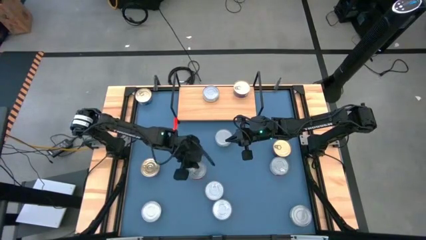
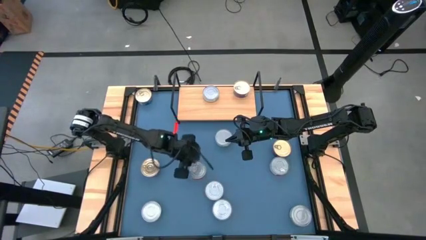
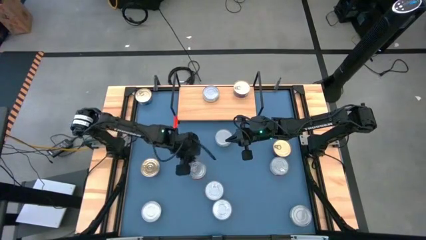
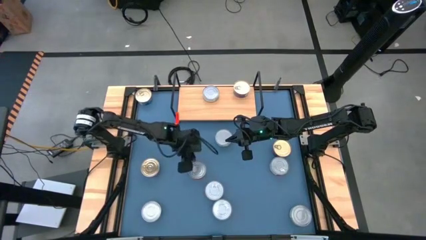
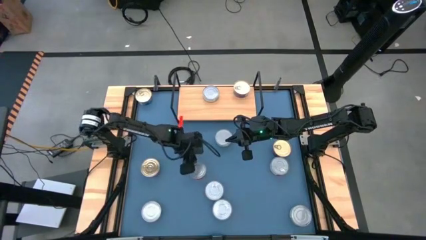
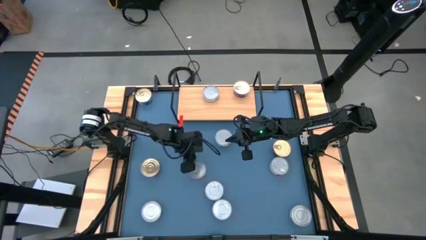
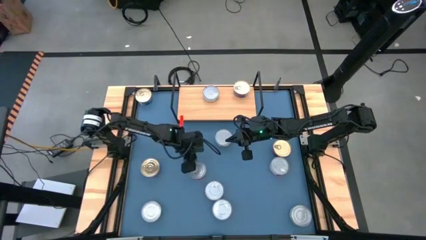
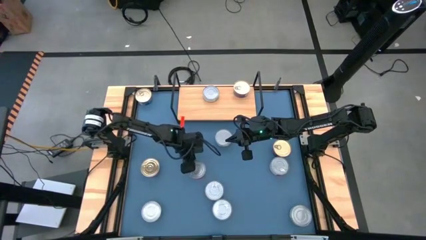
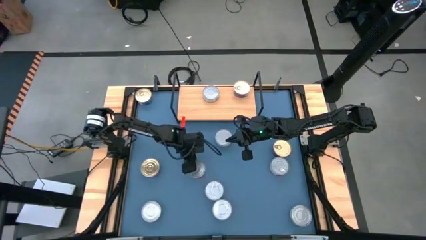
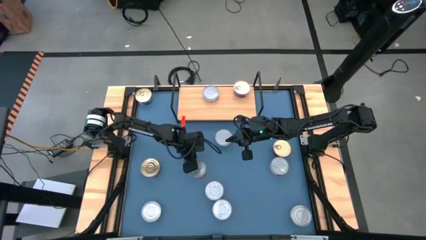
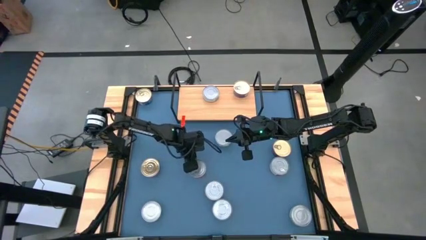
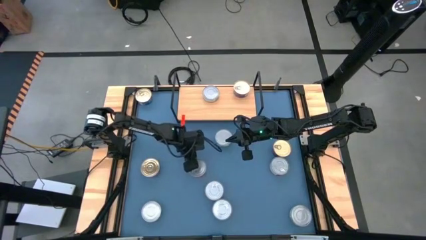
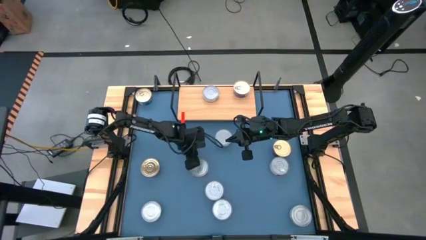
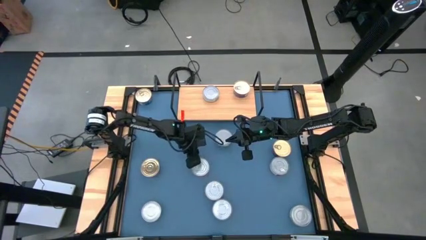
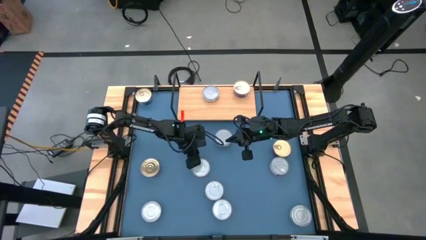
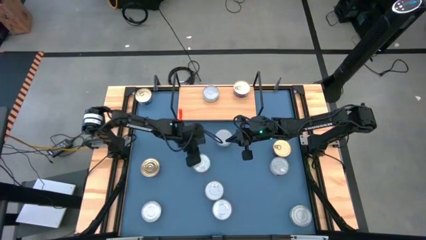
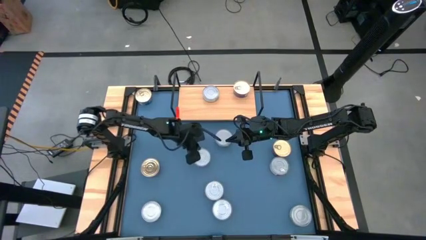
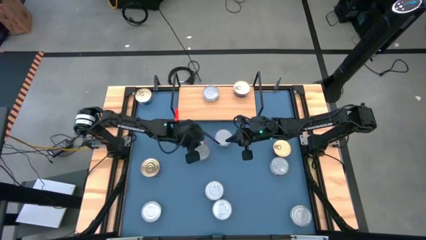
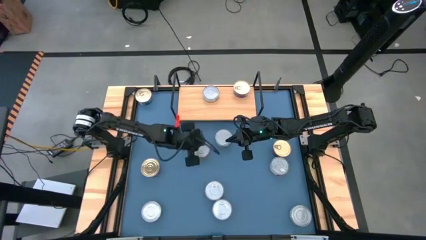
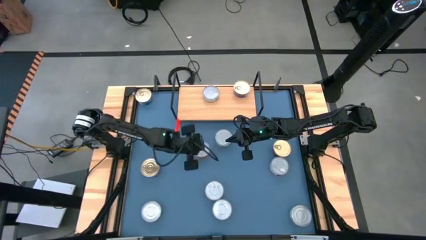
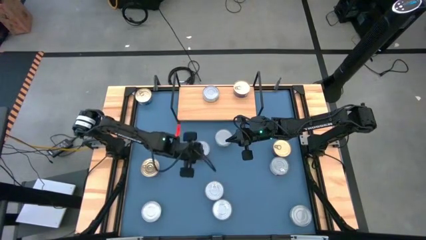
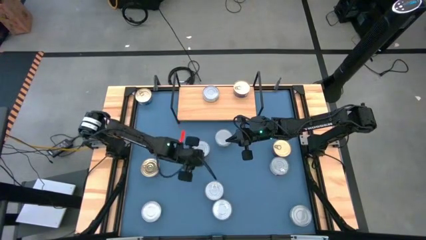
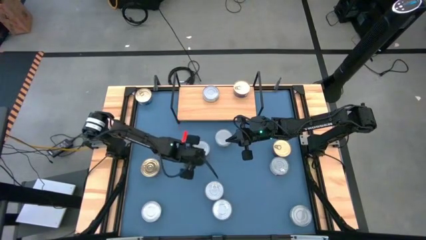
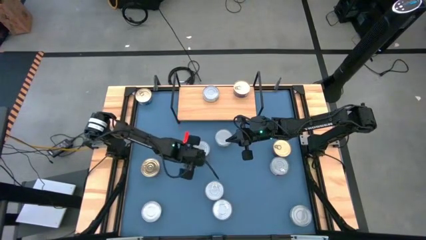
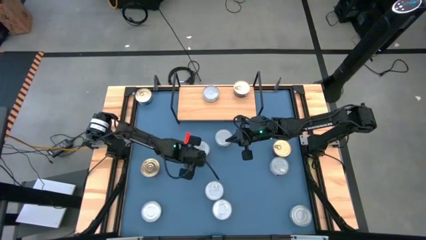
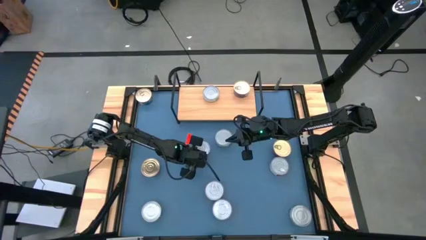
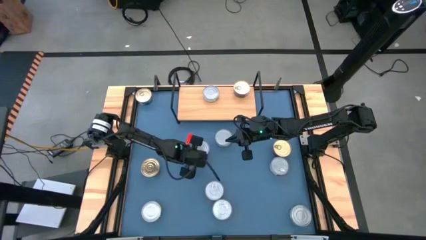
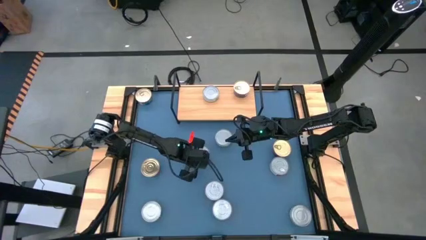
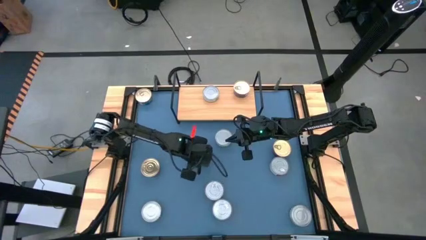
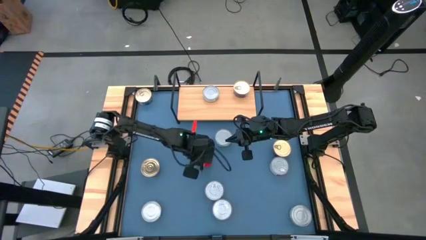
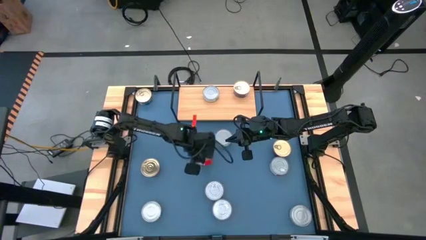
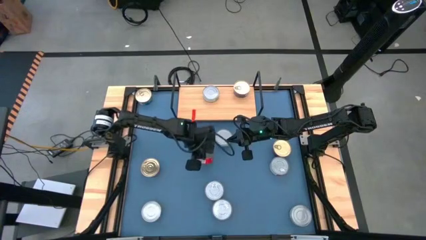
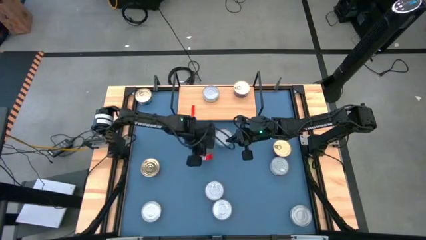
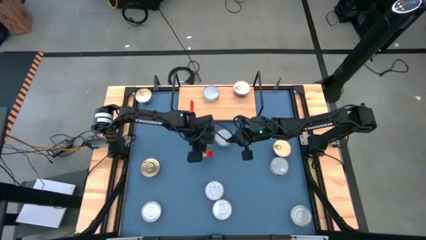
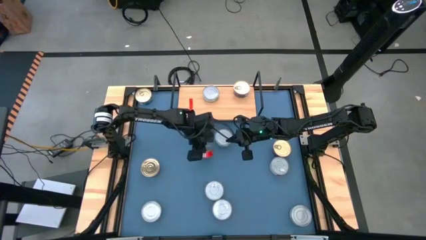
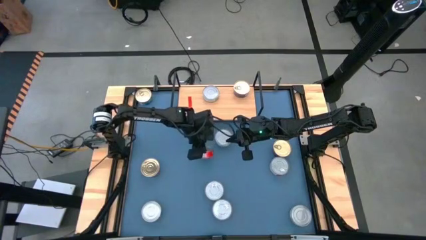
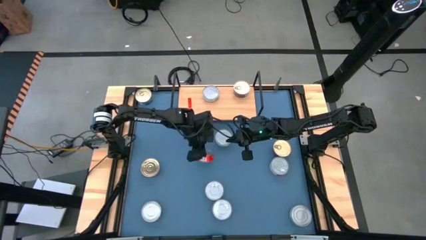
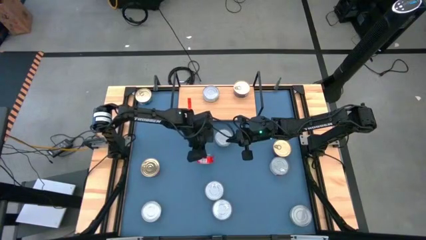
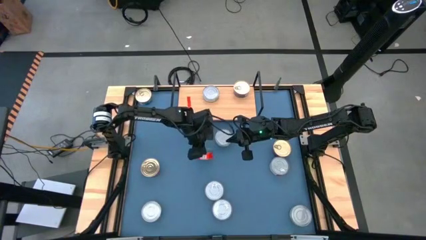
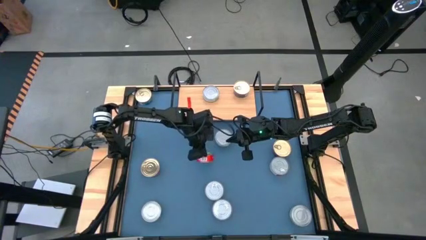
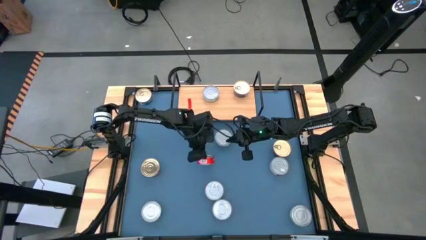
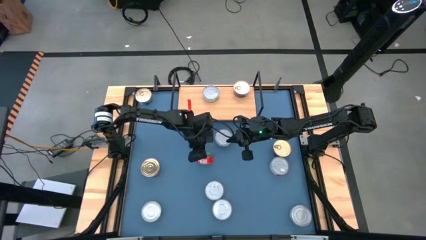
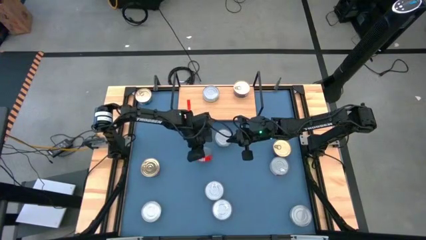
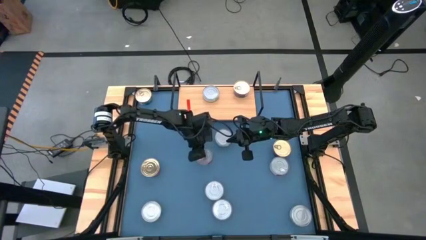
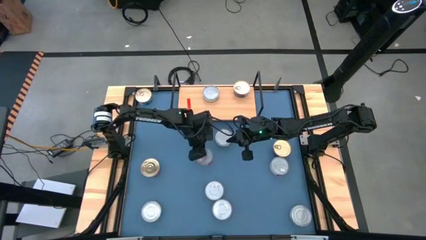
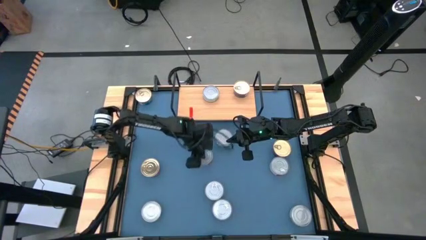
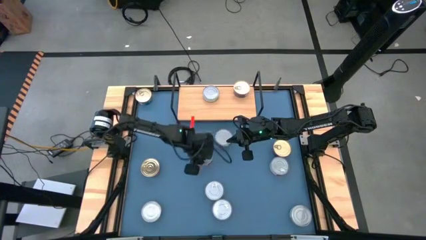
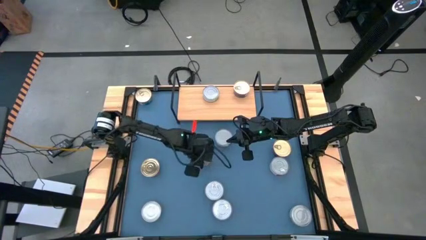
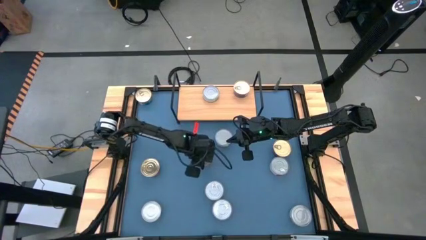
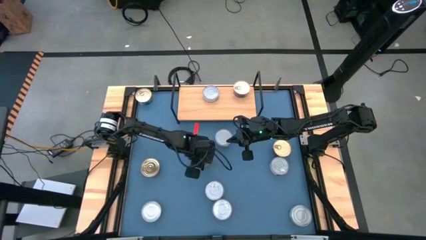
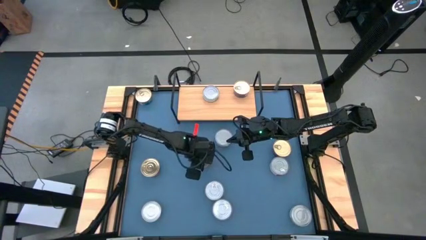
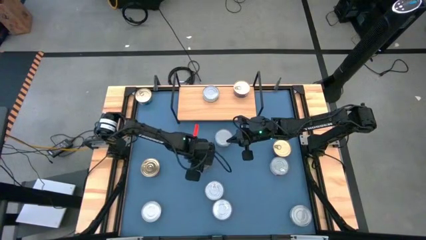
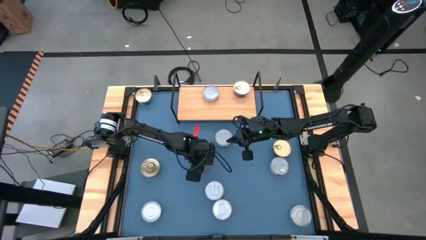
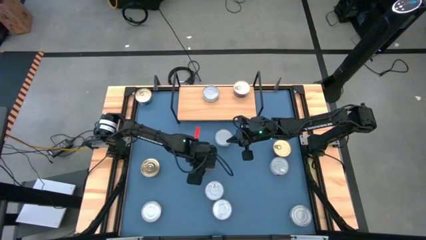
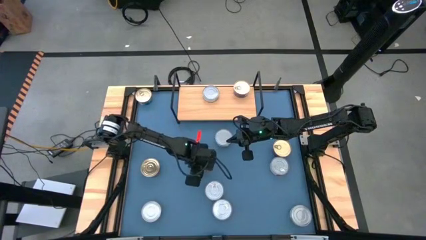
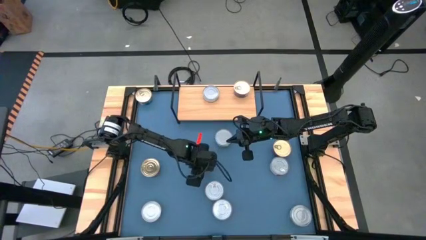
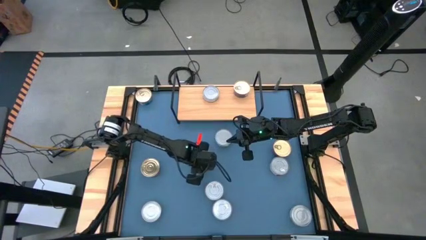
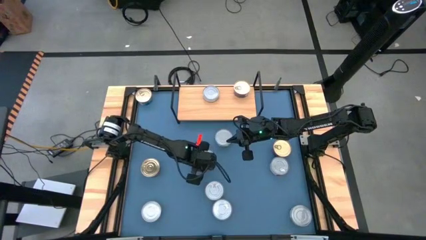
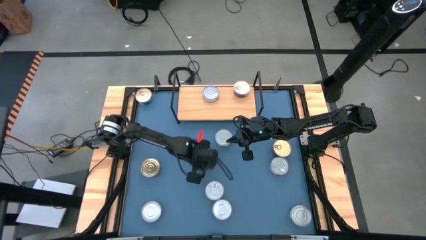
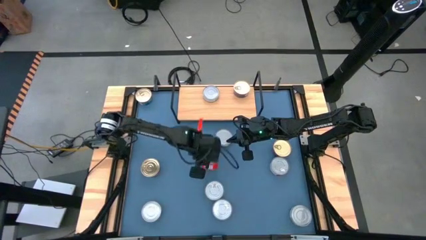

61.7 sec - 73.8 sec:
Task: Stack canned seafood by type on shelf
Put the red tuna can on the shelf

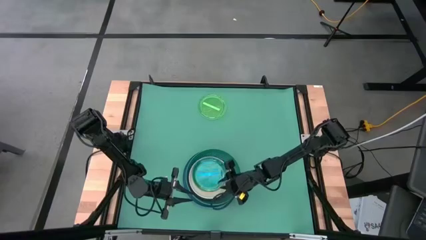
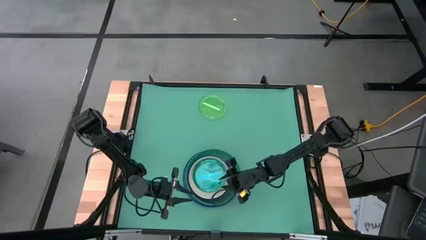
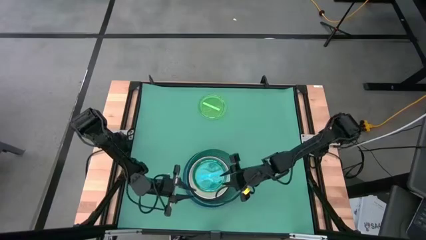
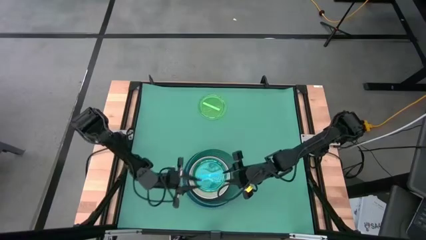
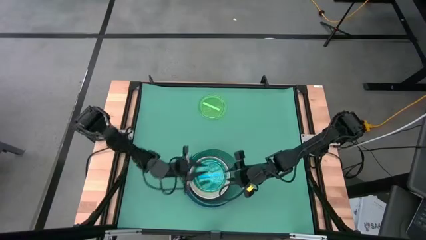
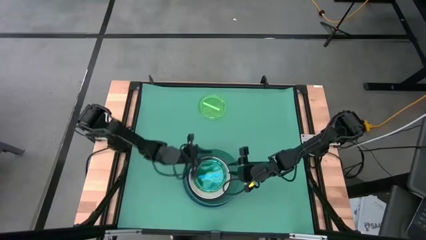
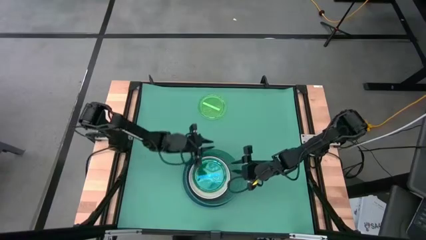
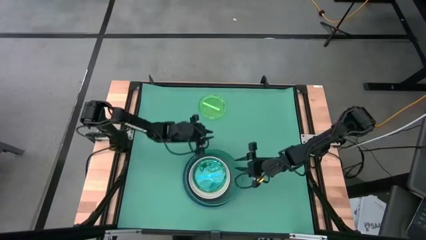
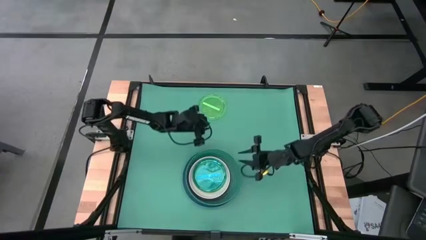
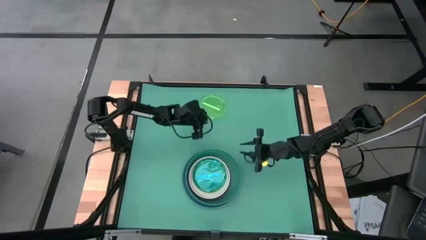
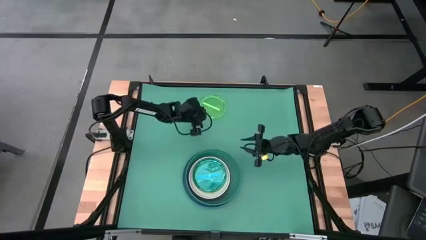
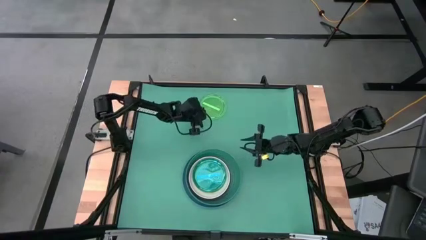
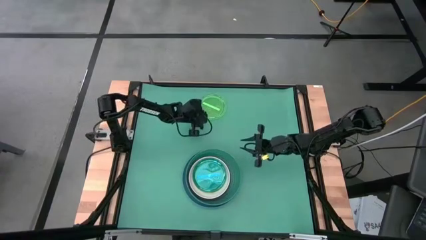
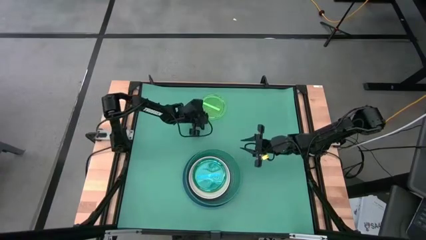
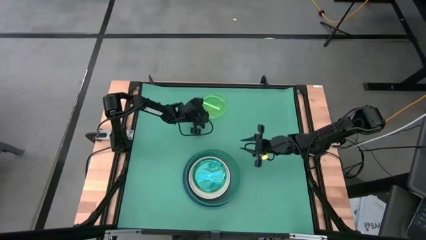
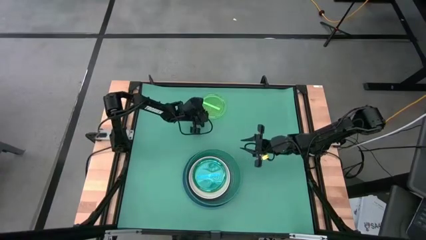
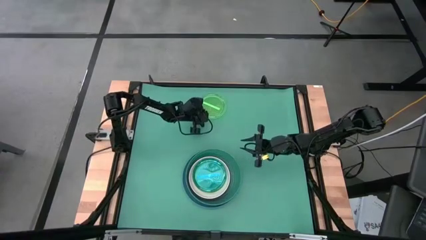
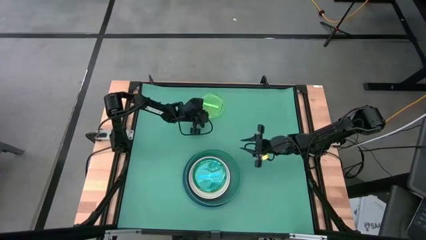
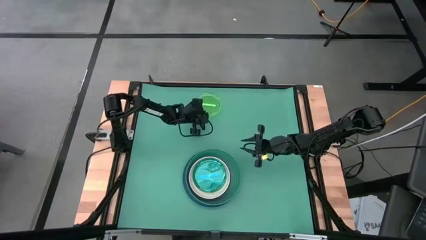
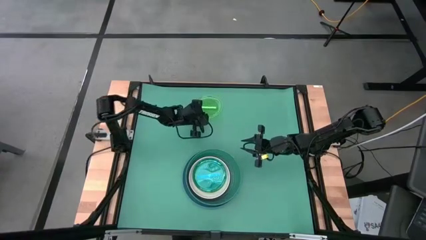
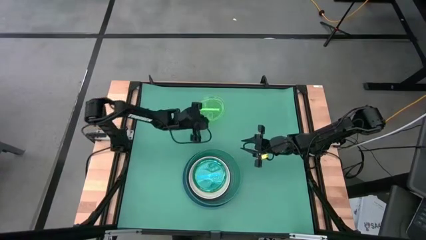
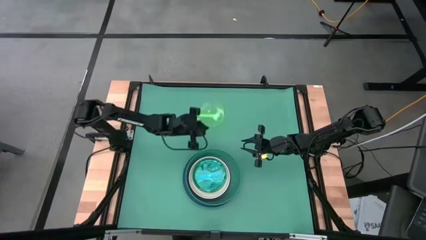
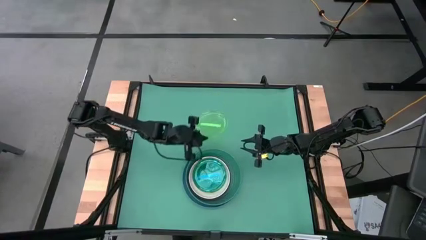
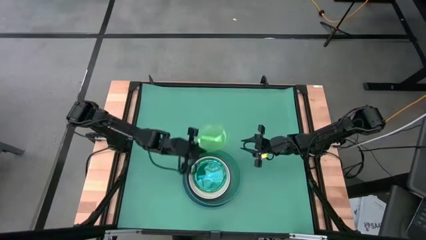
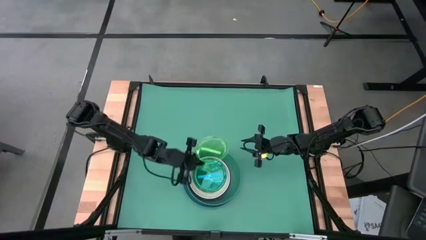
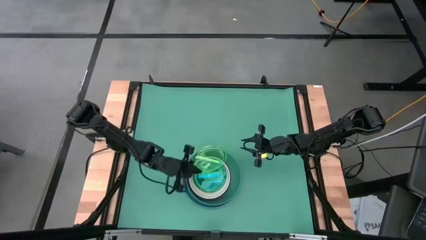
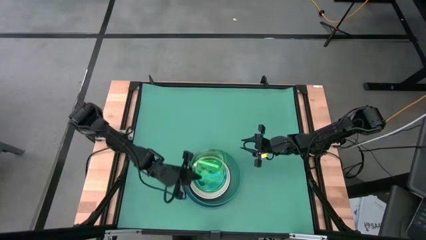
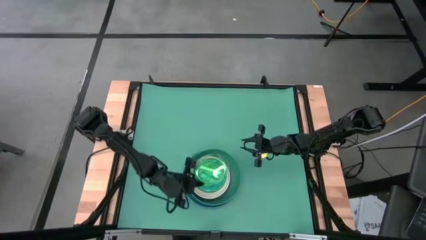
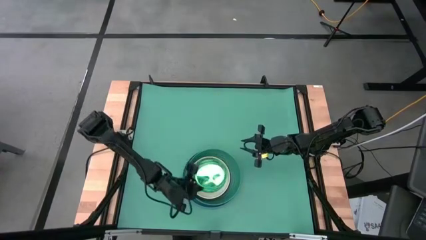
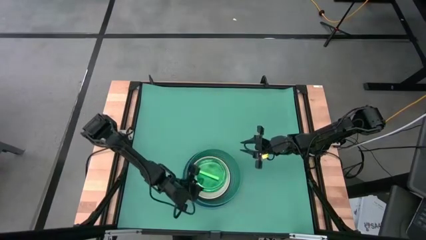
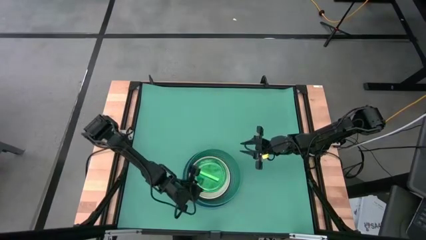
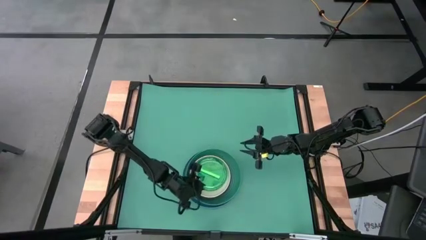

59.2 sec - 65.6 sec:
Task: Stack plastic plates
Stack the green transparent plate on top of the blue transparent plate
